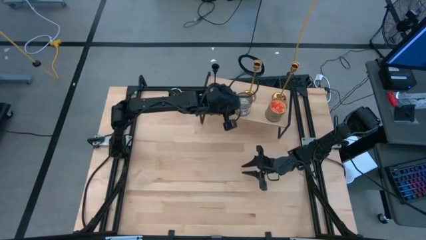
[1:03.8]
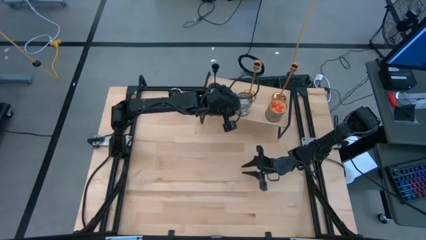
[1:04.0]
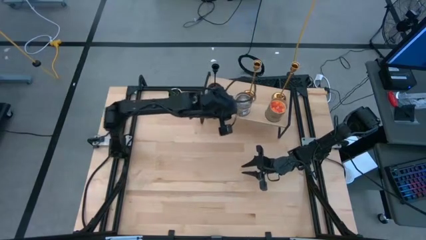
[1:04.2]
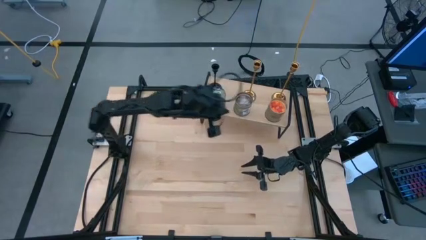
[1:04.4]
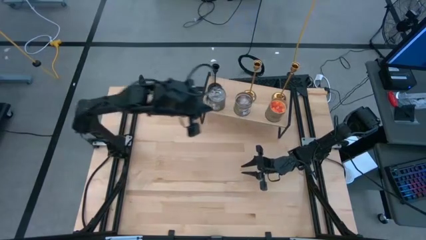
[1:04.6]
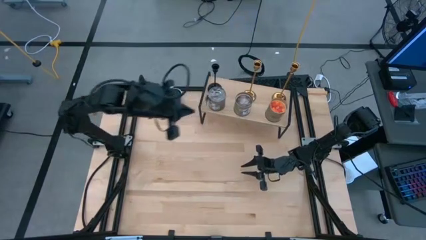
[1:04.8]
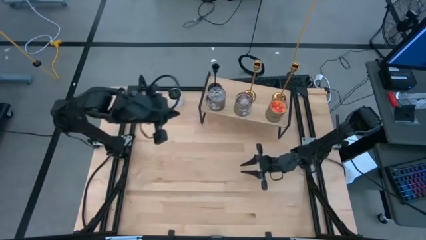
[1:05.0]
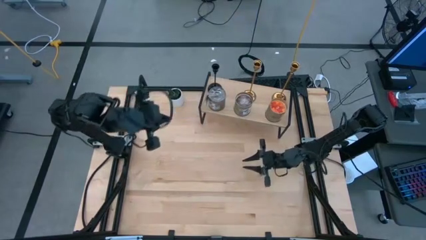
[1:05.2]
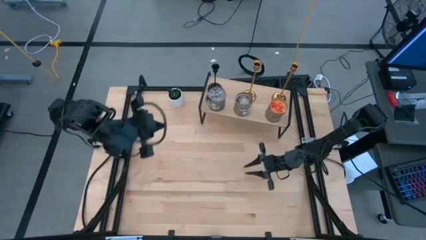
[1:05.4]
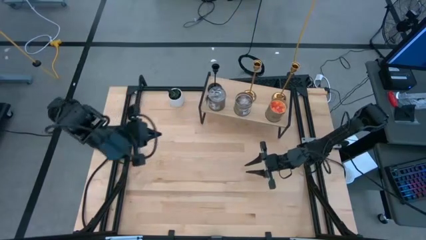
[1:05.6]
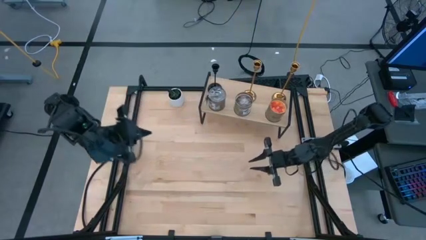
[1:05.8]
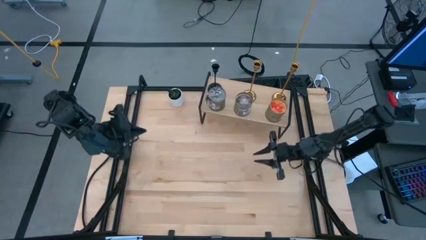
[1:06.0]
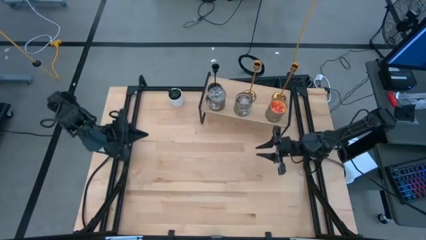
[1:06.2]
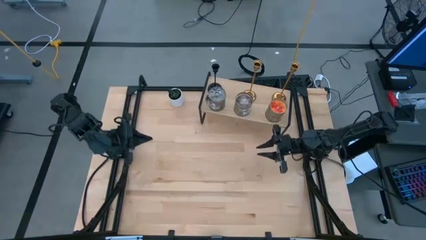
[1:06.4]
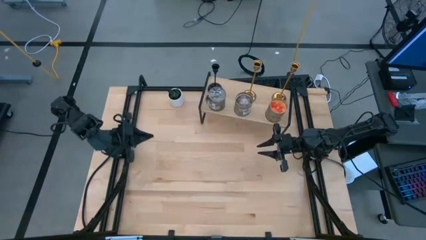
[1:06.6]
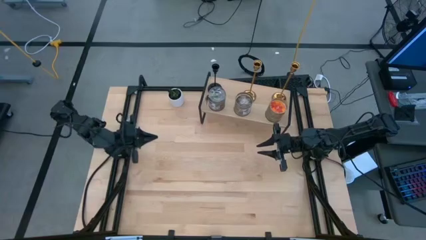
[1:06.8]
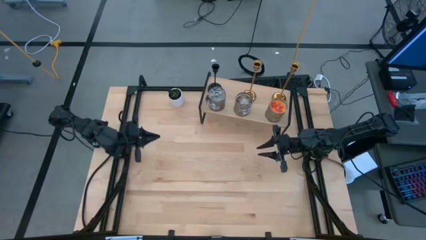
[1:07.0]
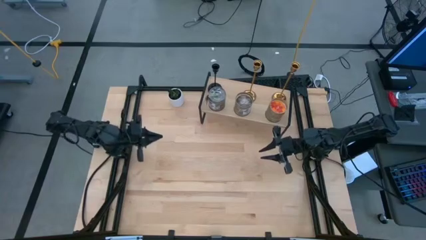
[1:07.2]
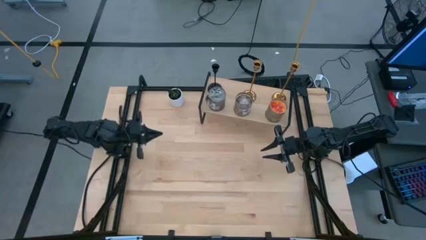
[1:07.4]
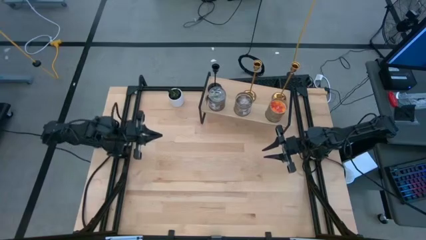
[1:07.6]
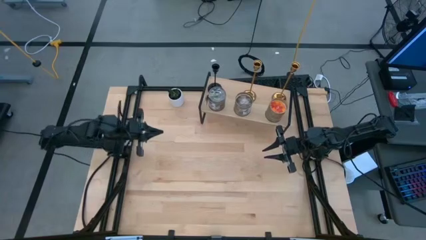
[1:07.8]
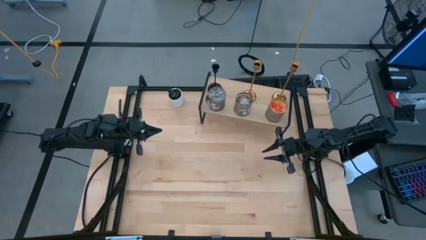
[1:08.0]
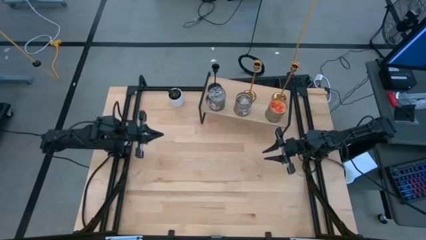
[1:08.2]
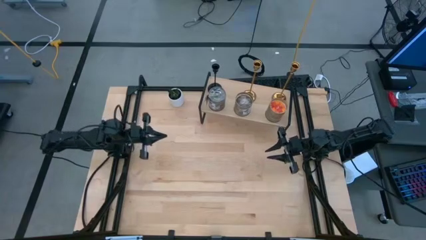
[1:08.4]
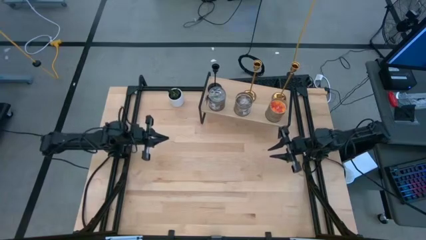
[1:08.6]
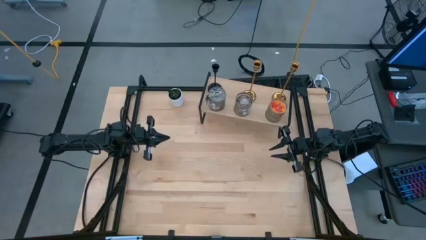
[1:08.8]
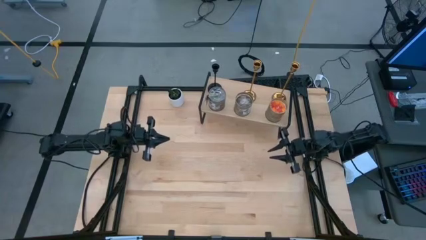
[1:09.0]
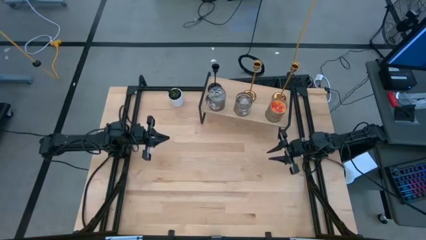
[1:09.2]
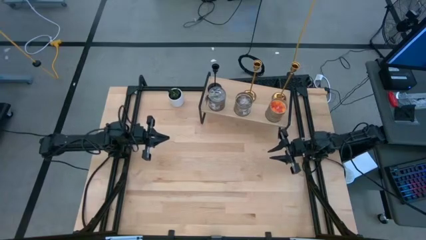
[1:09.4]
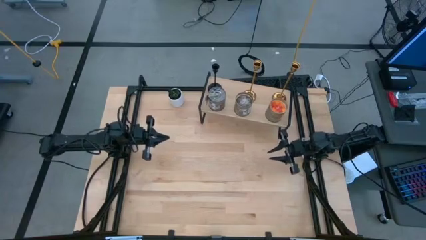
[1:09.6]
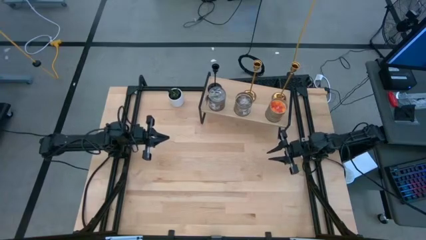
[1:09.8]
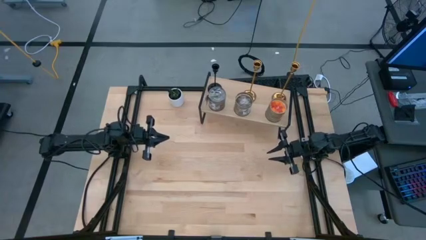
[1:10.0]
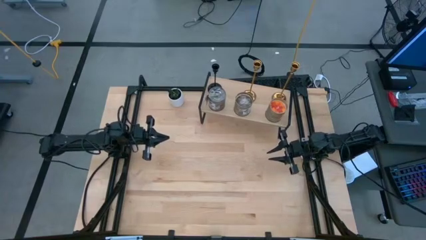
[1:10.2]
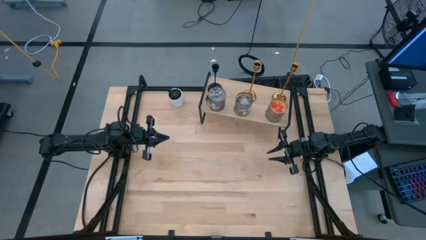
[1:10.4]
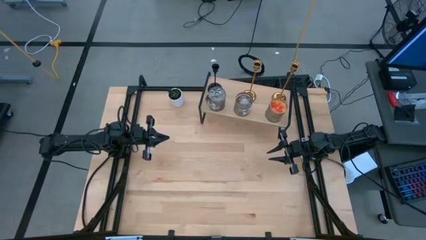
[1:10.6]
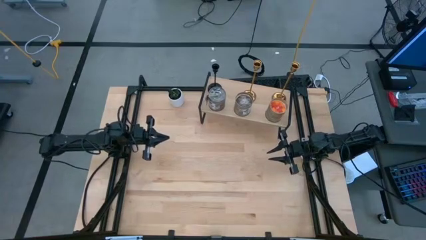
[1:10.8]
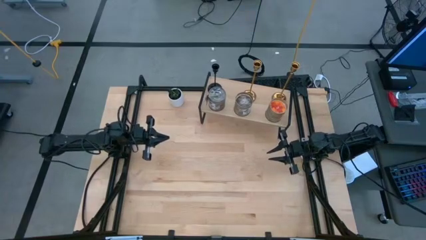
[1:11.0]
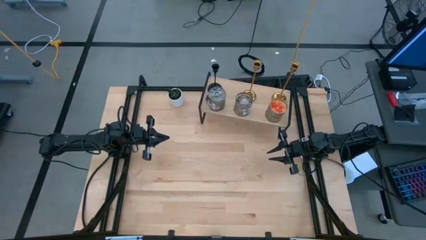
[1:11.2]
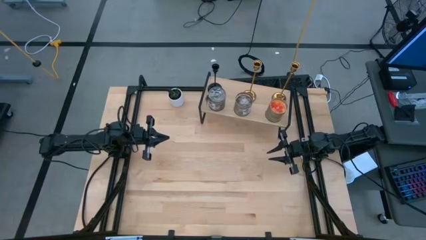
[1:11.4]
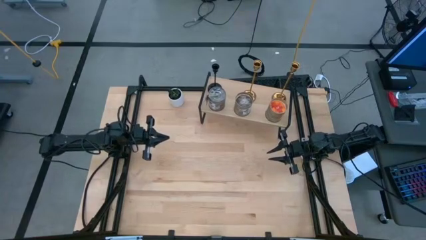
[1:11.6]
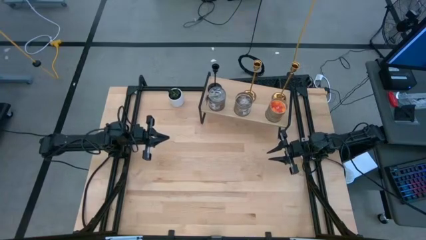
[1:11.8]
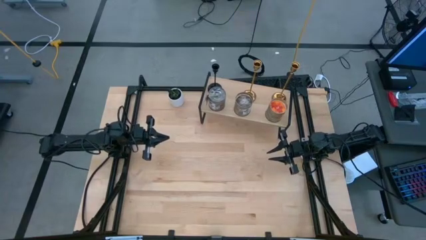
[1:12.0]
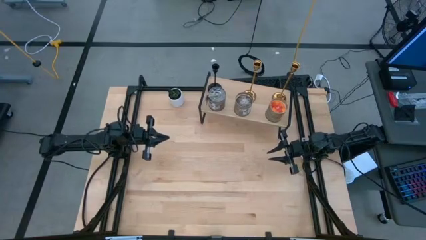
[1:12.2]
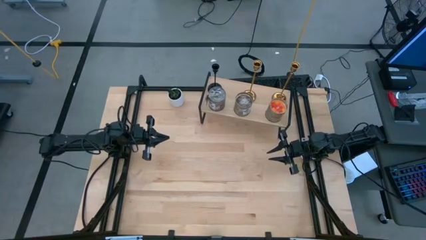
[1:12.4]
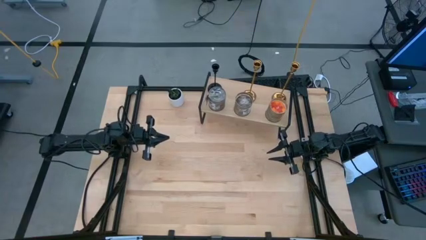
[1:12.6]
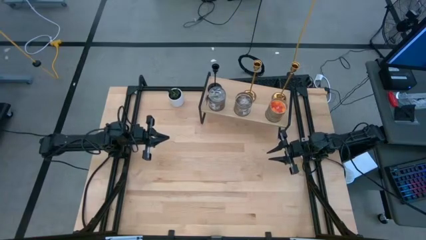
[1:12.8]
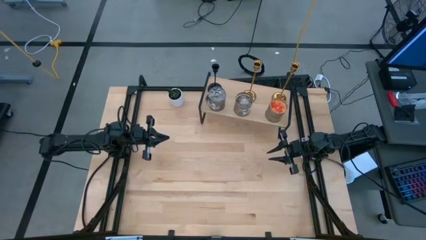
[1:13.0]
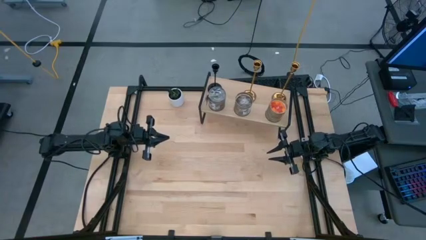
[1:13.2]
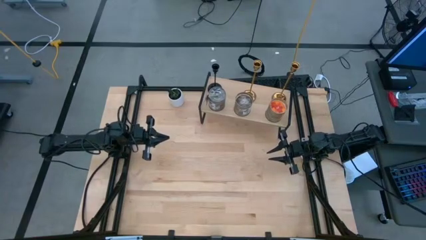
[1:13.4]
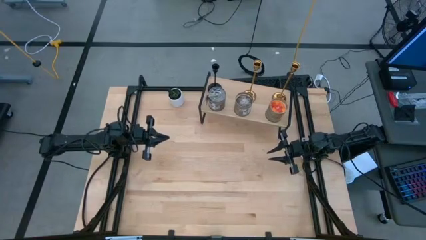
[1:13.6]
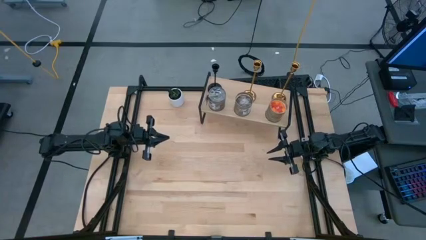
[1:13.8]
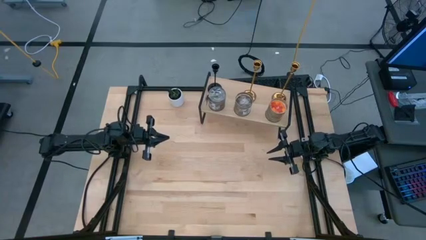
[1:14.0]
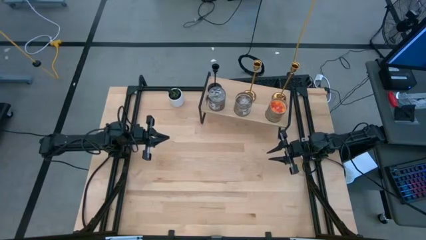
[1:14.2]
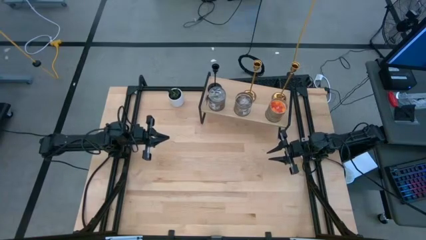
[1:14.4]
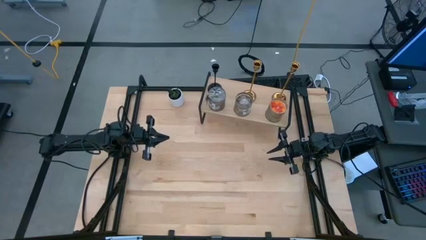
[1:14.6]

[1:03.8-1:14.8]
Task: Pick & Place candle stick holders
Return to Home Position

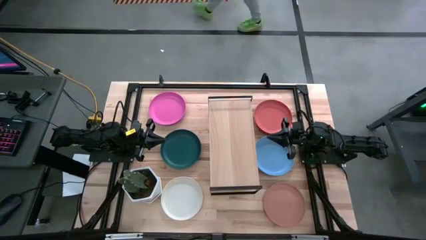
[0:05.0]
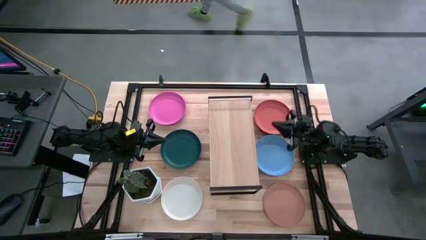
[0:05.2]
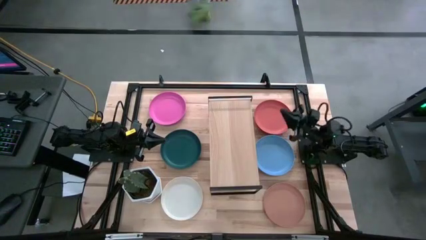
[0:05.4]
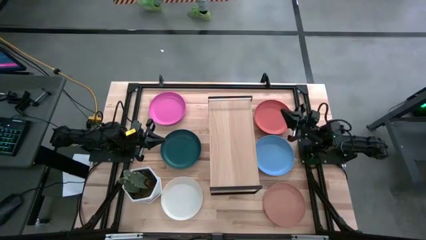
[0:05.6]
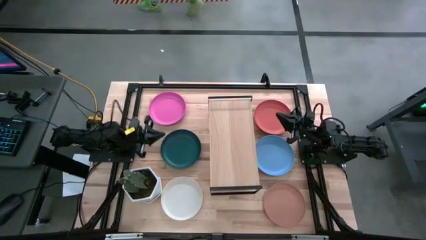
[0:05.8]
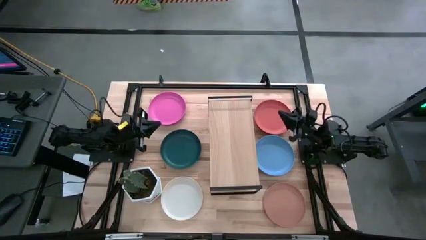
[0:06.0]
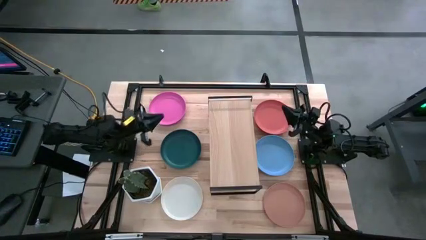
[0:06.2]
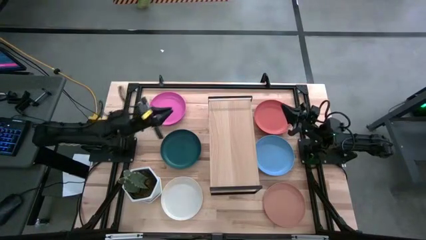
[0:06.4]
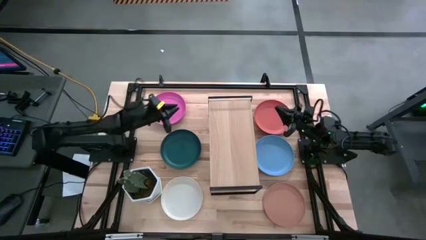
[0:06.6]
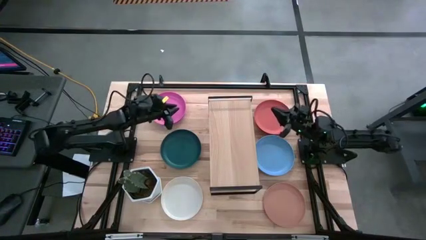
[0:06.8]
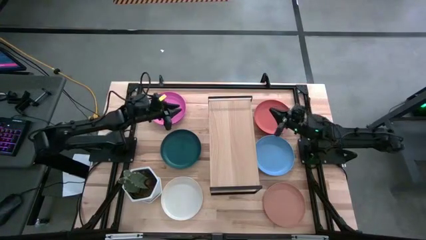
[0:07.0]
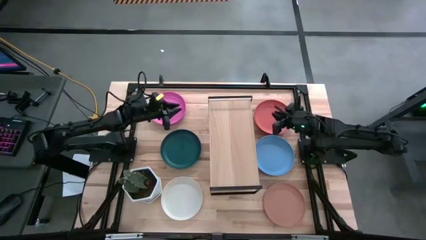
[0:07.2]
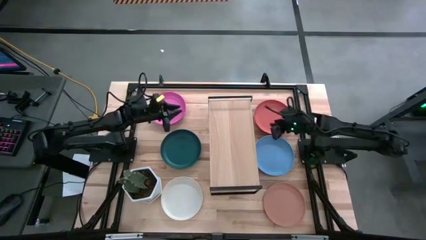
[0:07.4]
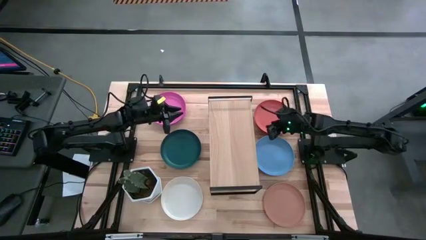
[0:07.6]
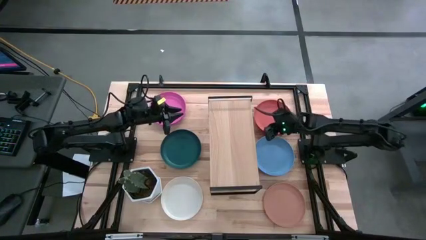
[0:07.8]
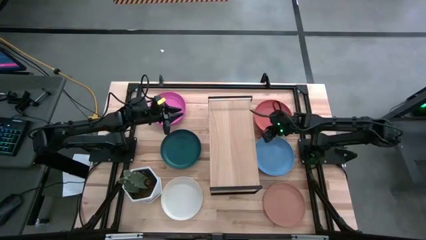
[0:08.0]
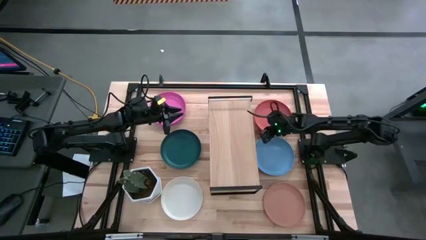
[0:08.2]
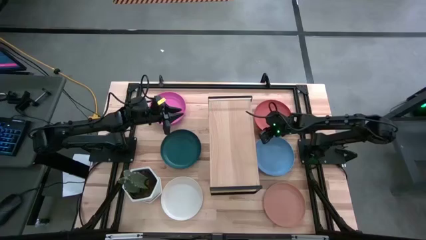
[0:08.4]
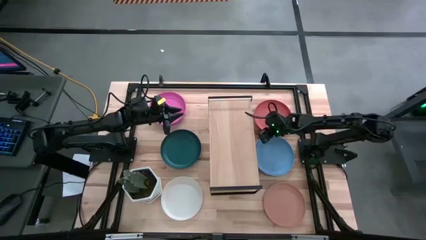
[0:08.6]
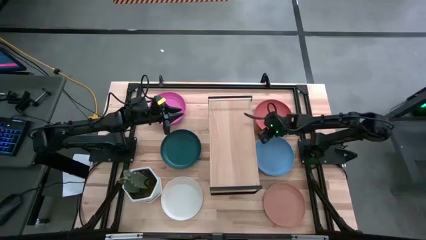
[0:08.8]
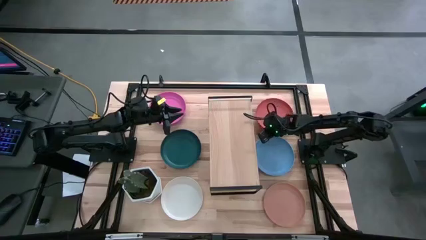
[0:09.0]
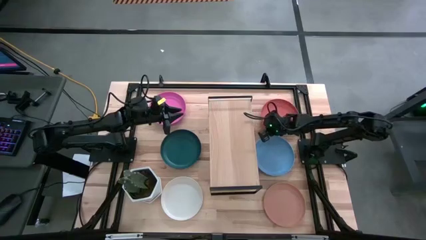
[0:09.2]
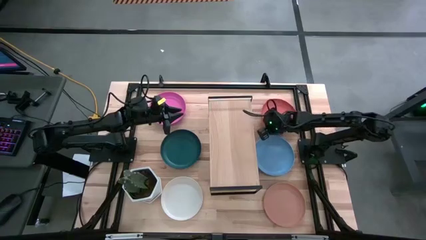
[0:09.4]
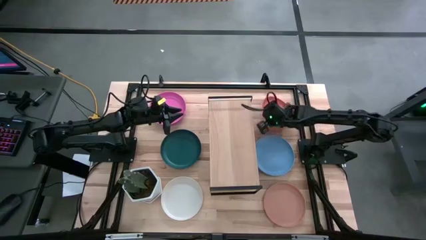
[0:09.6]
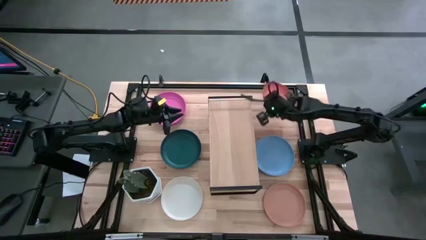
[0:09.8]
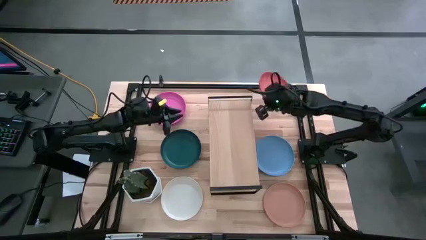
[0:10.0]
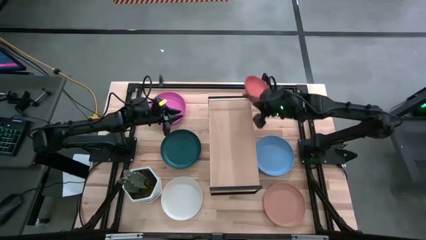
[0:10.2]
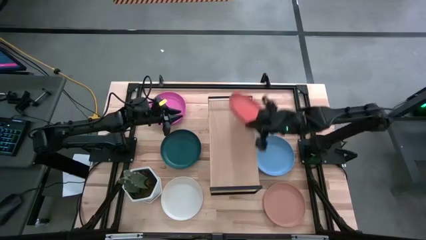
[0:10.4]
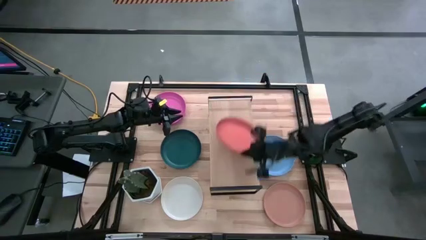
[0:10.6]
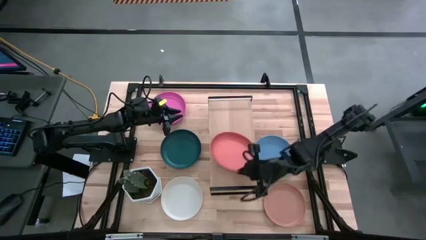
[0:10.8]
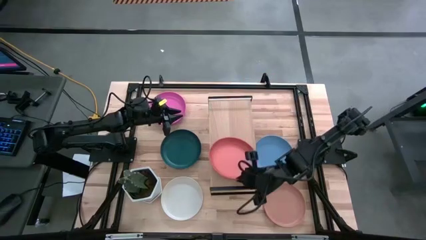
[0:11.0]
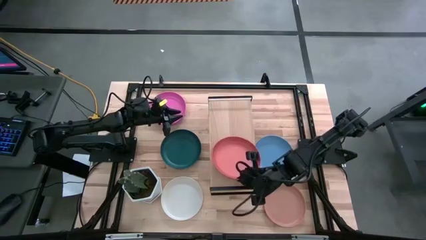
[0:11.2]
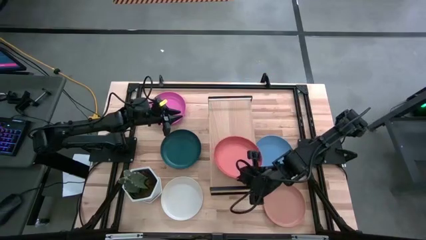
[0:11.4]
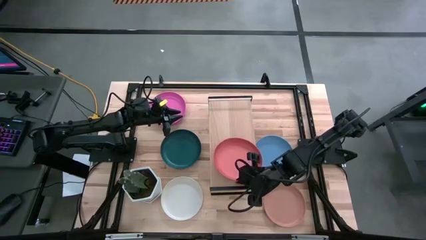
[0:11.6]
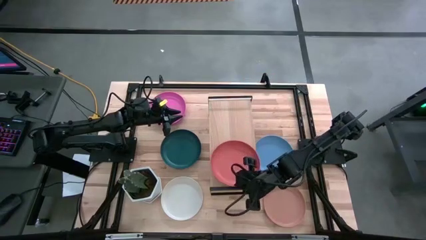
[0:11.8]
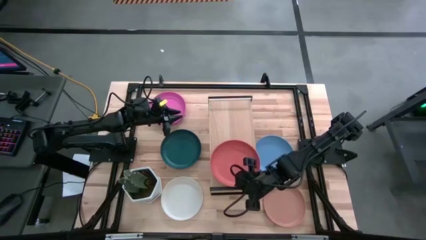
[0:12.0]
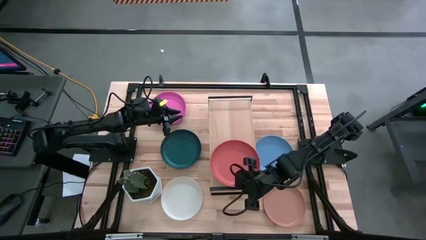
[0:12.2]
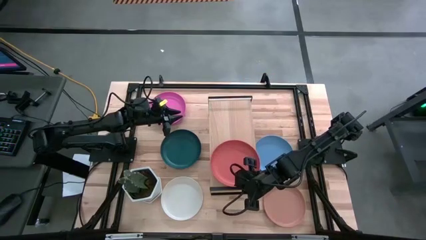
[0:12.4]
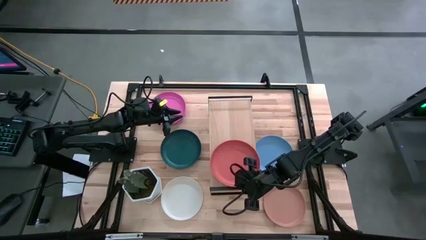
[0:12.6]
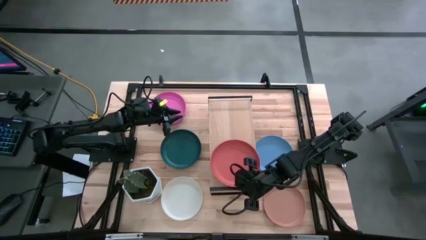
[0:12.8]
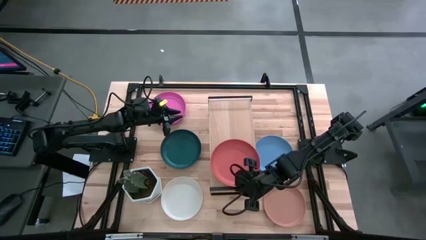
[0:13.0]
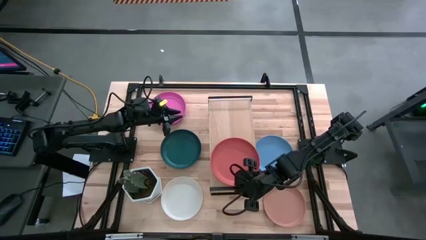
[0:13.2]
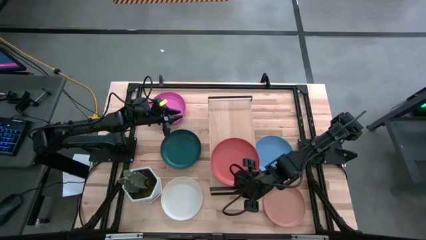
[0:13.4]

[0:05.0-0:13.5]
Task: Place and stack plates onto a shelf
Put the orange plate on the shelf
